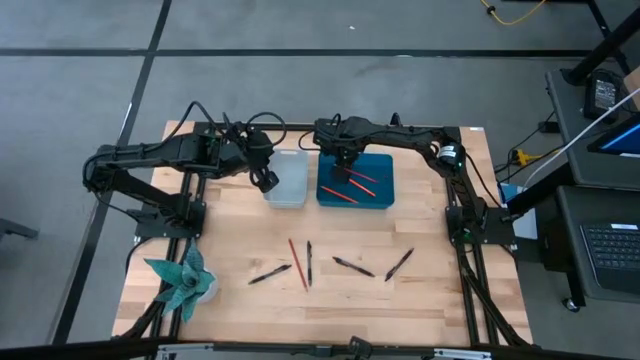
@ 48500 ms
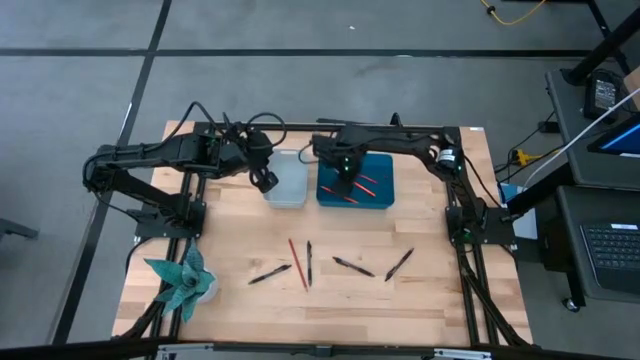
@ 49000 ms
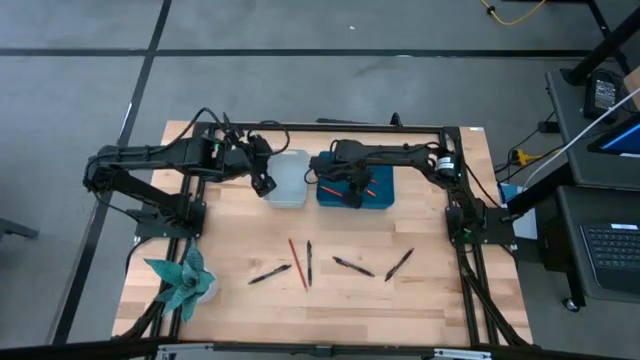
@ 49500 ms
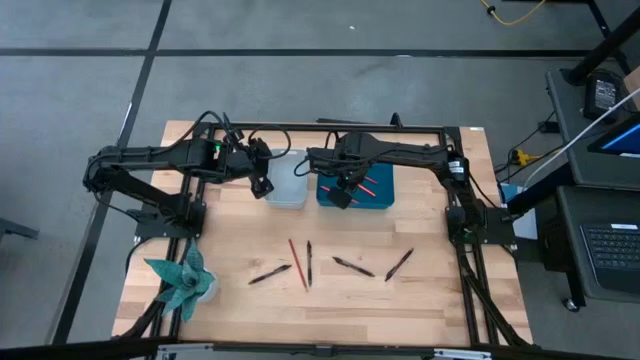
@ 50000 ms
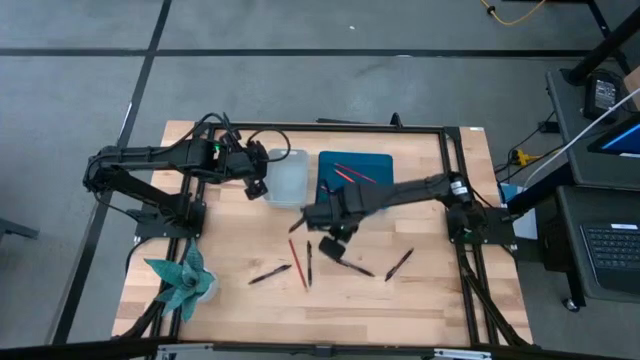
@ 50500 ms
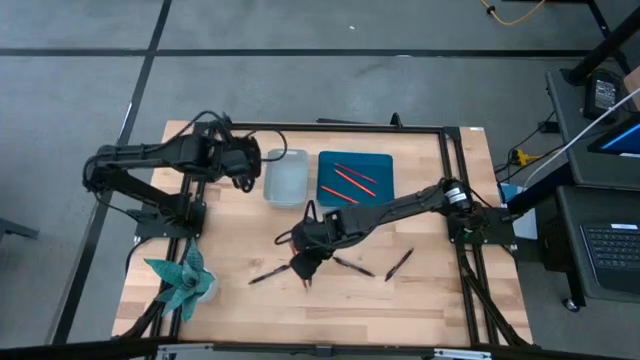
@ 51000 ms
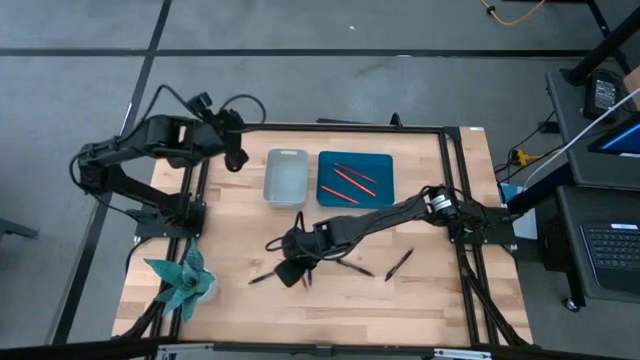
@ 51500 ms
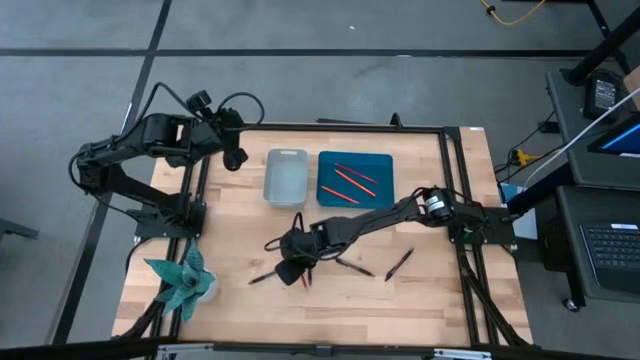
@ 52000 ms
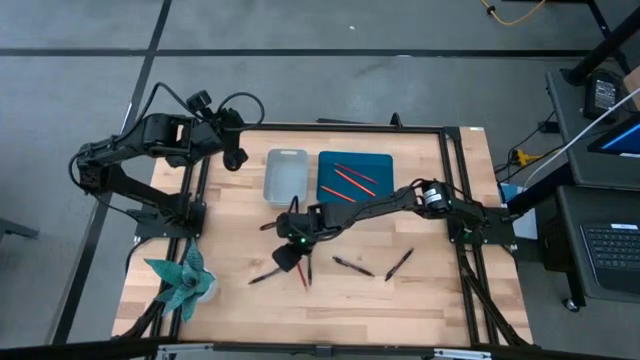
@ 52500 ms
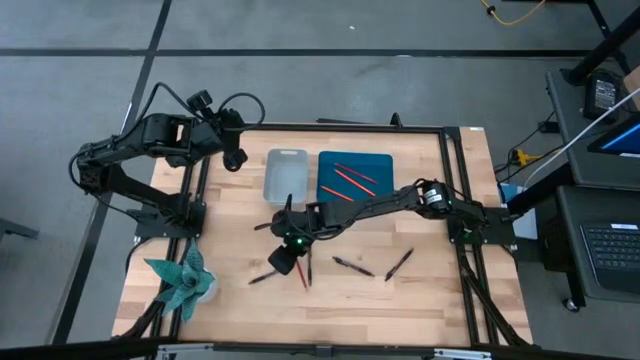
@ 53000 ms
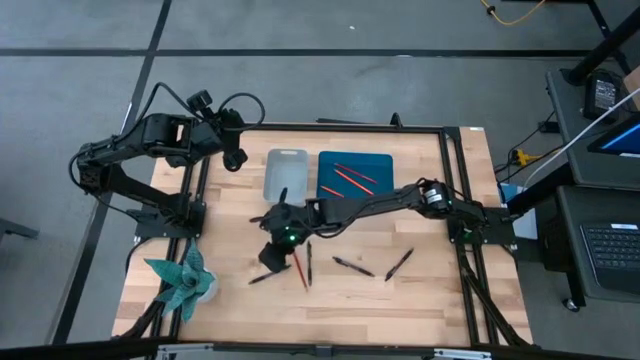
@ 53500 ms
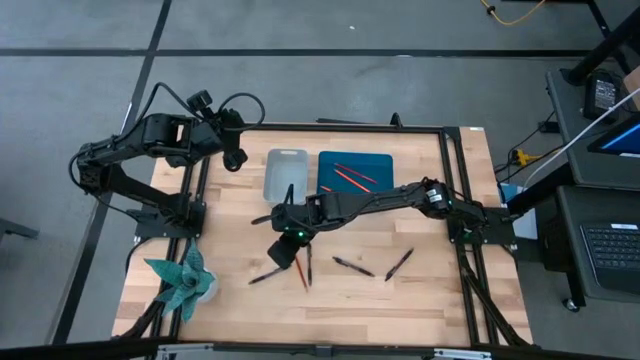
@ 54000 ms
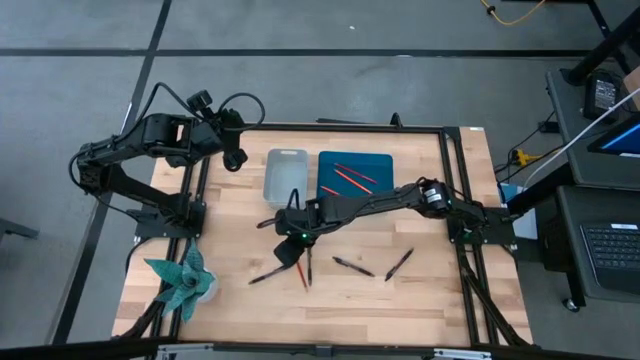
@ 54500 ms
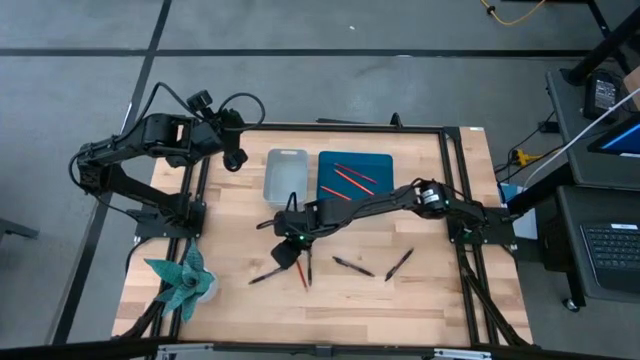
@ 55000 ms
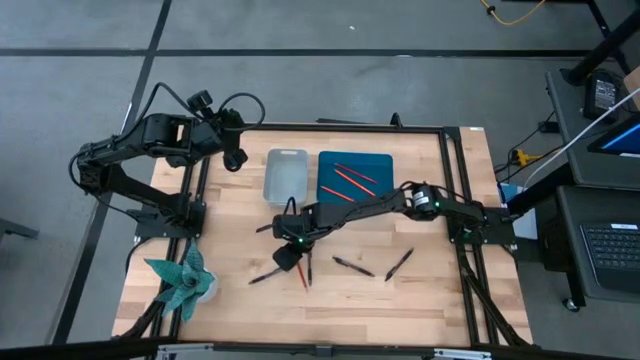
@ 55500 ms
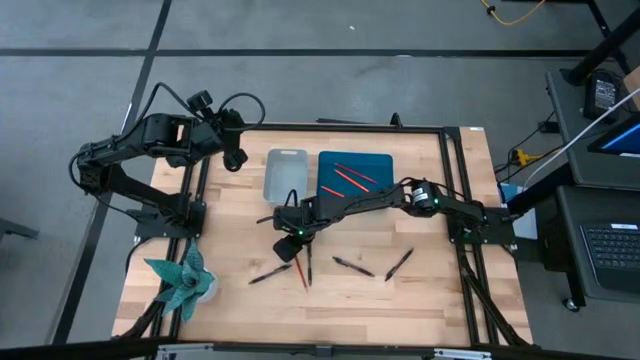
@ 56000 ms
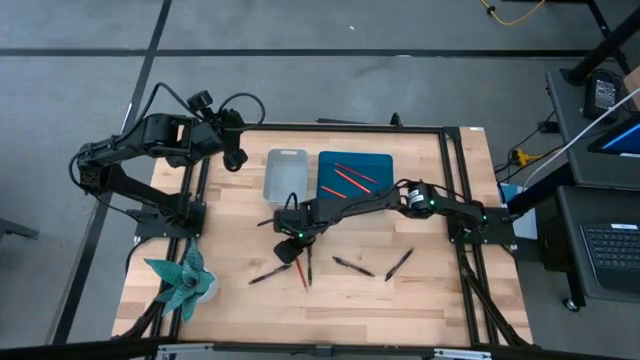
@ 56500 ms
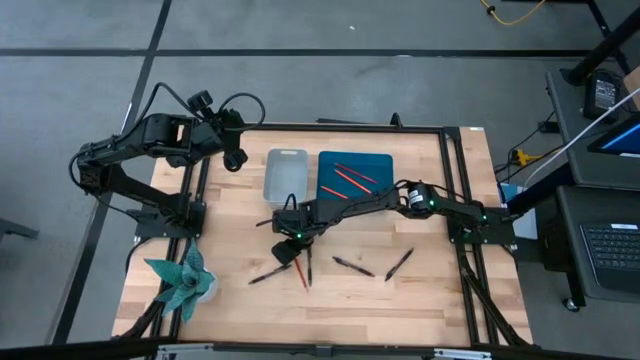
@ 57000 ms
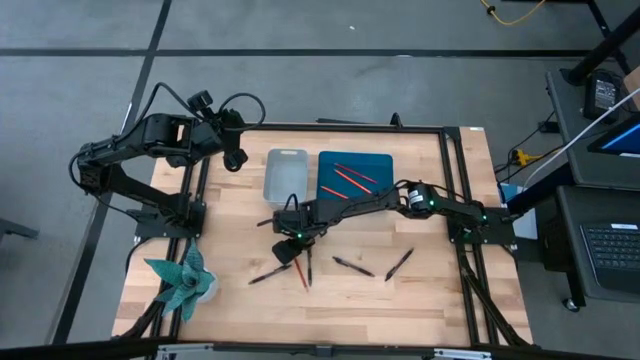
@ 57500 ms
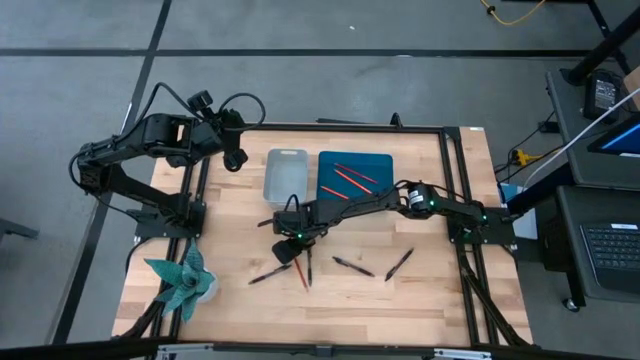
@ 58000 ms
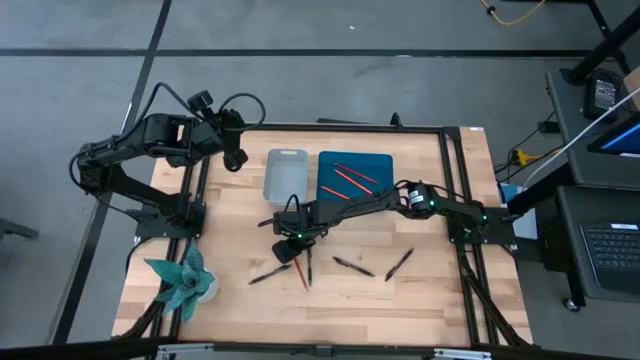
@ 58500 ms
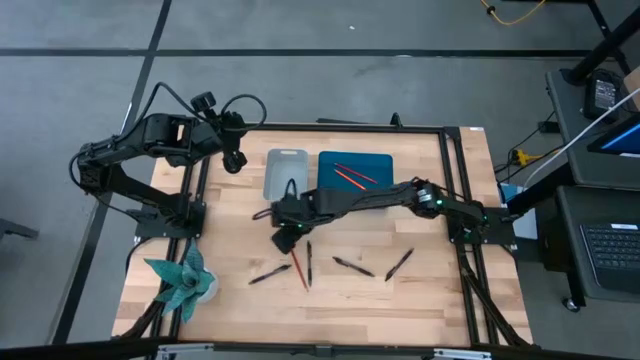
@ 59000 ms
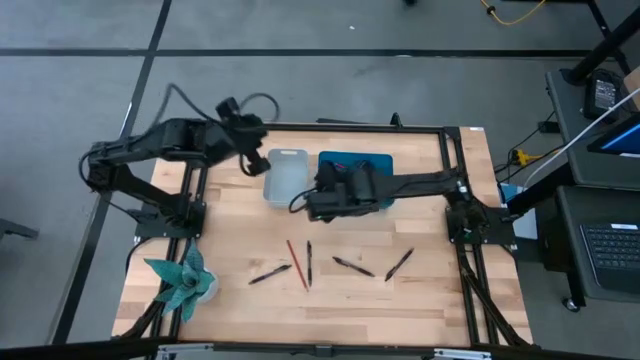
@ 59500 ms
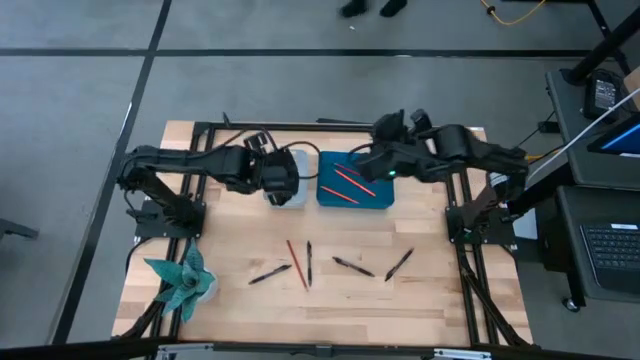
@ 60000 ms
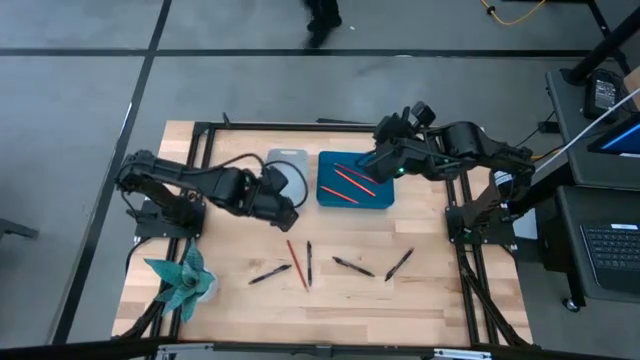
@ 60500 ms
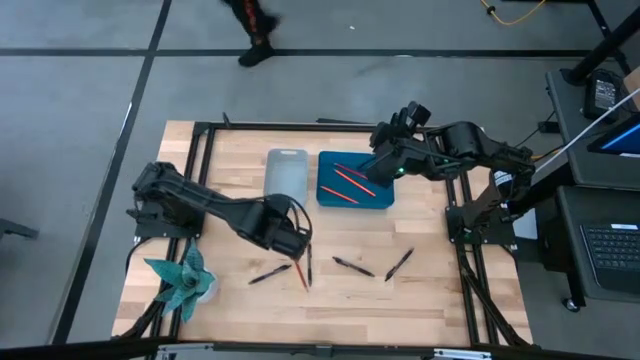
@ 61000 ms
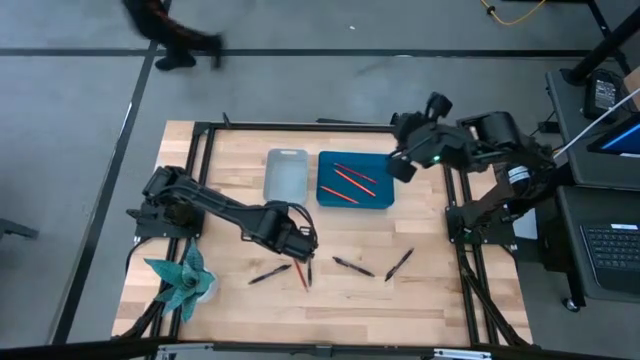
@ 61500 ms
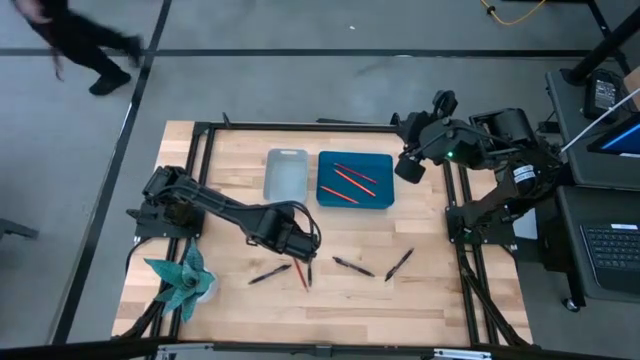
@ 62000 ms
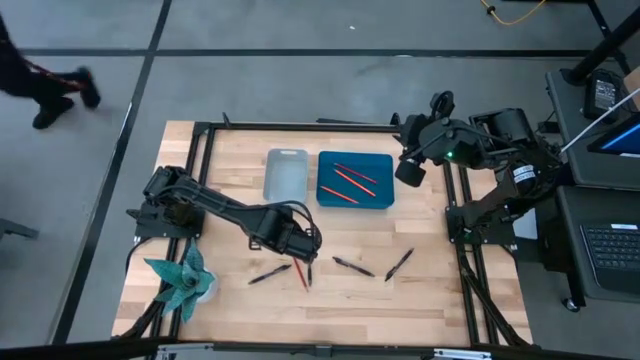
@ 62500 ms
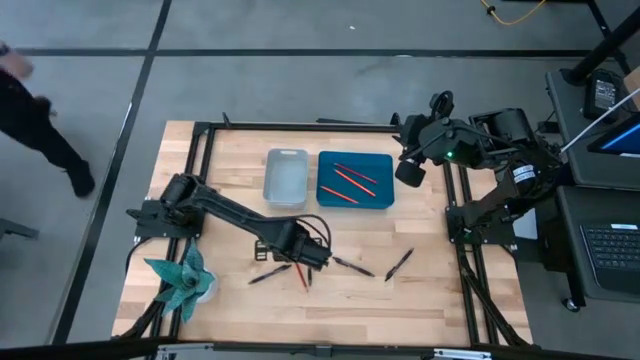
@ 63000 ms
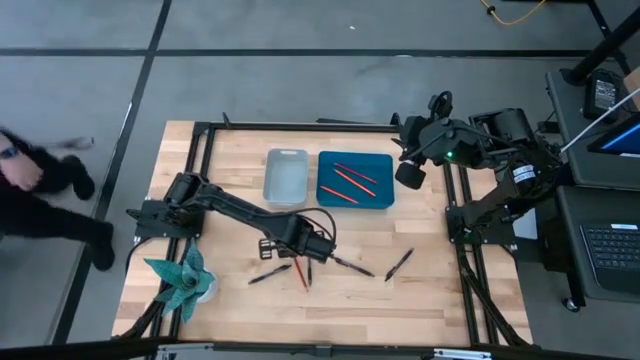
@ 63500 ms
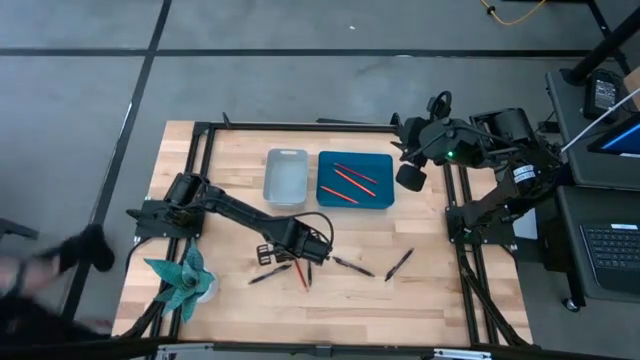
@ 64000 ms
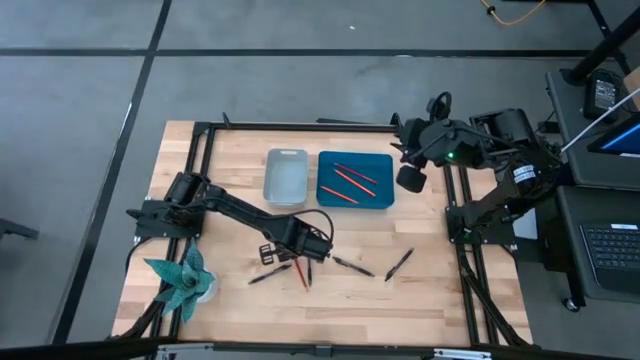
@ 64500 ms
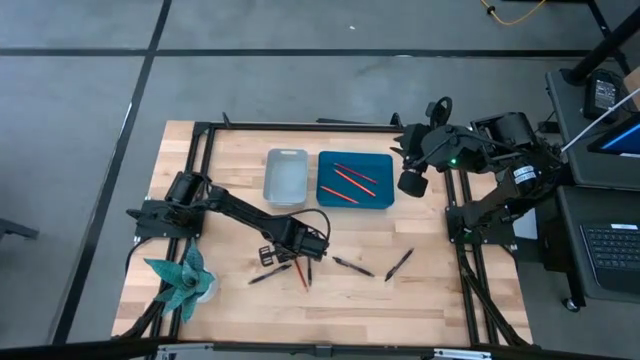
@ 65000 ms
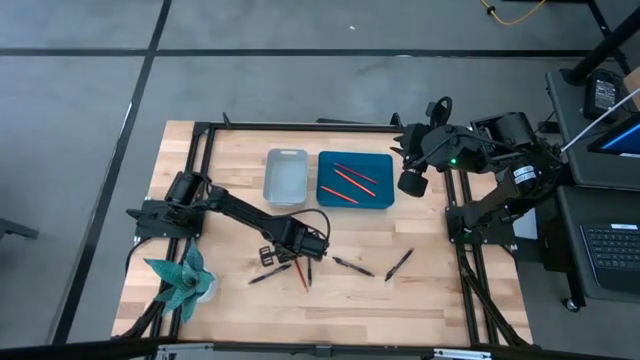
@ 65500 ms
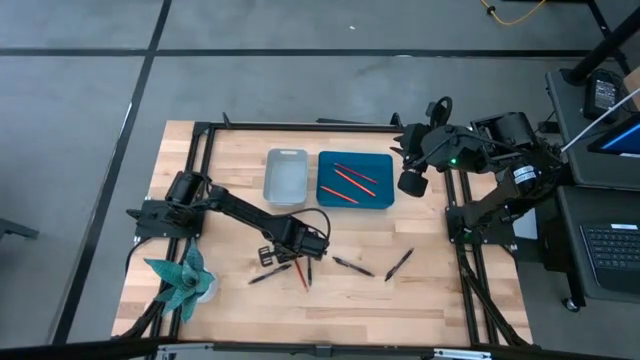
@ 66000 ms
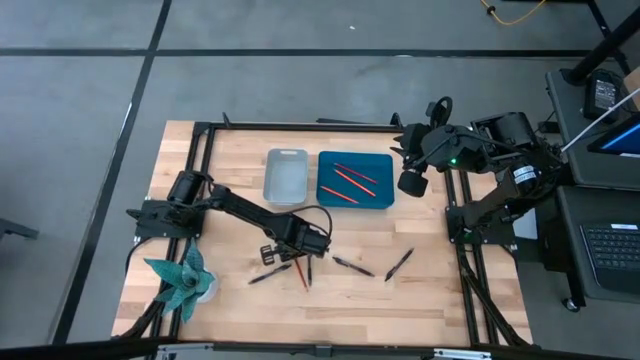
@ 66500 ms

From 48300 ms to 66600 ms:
Task: Sort pens & pencils
Put the red pencil into the blue bin

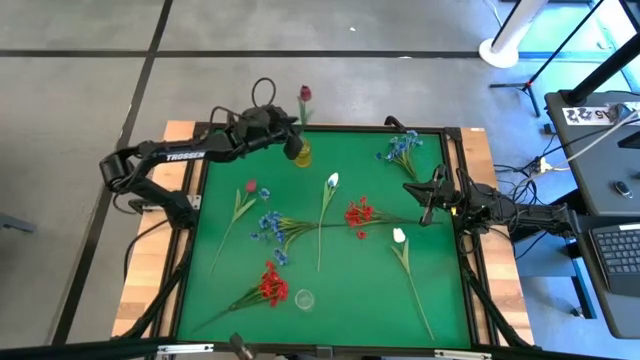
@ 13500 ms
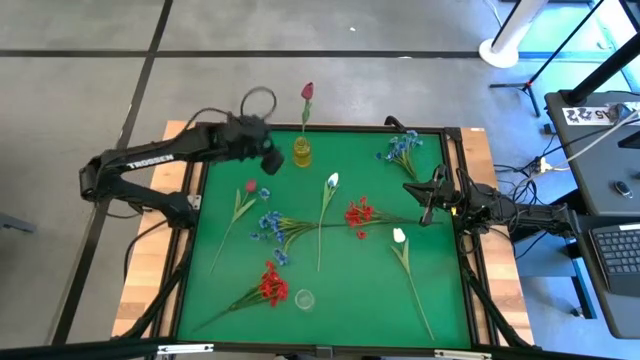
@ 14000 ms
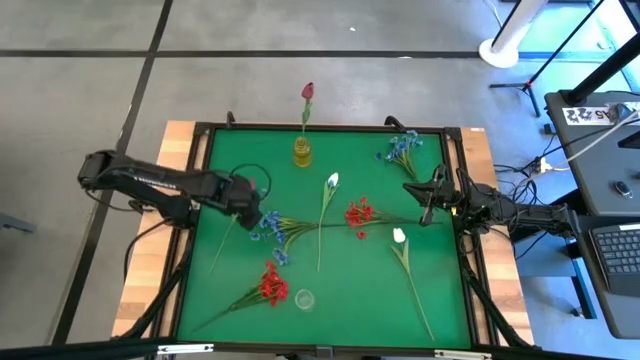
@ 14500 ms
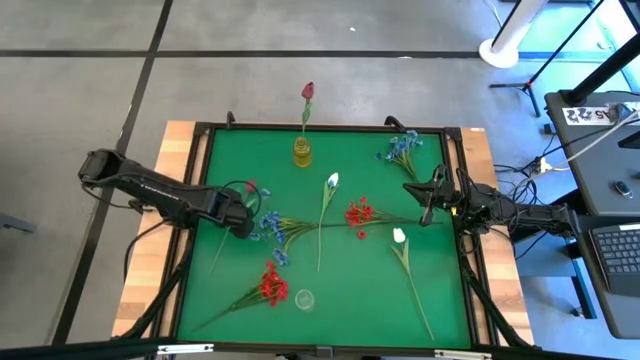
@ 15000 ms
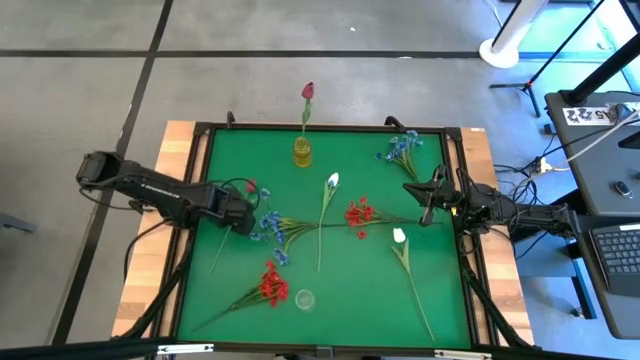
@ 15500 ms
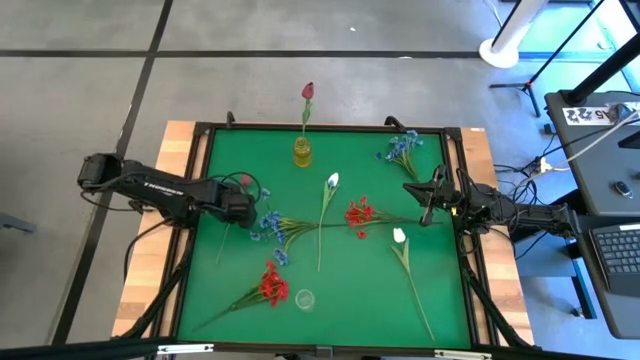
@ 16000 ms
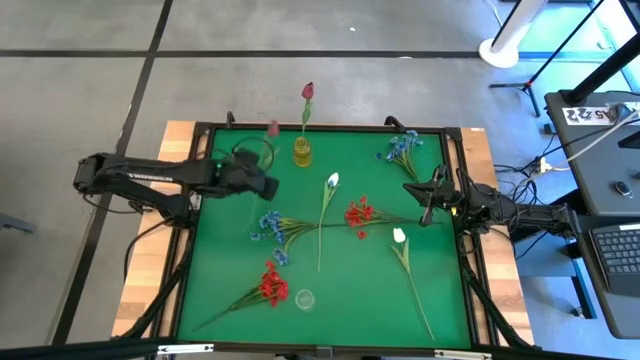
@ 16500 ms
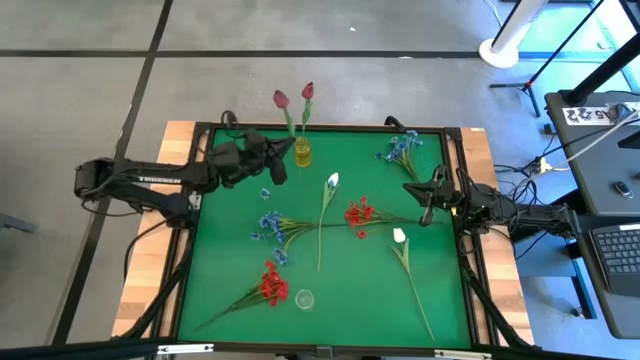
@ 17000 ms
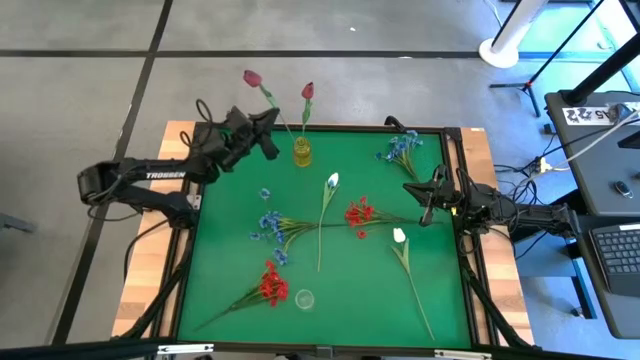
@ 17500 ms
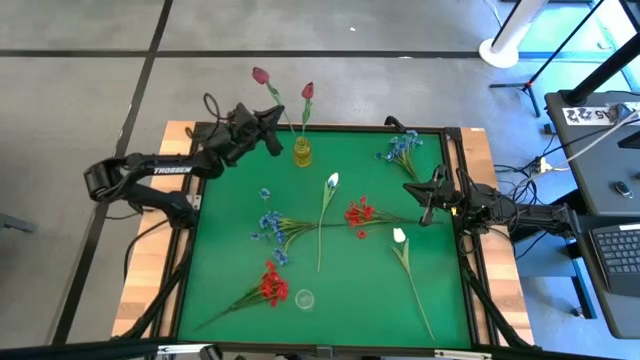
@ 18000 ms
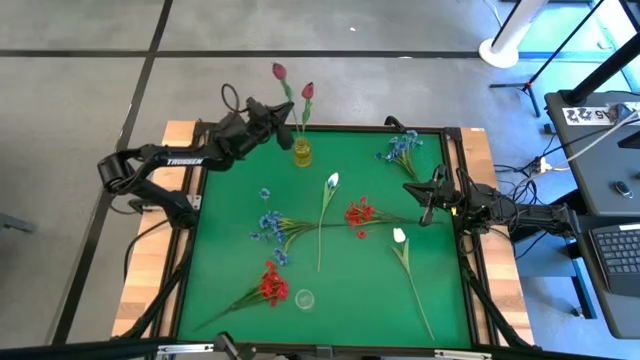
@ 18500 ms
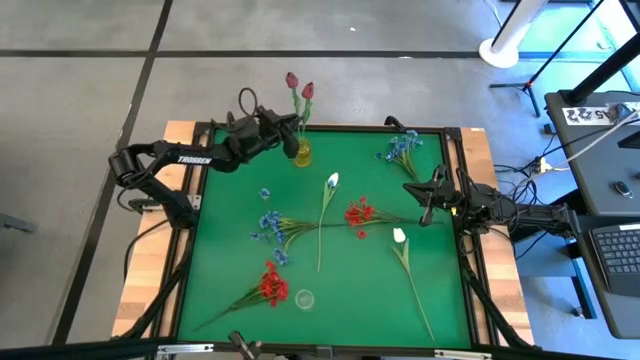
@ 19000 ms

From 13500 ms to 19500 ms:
Task: Sort flowers into vase by color
Put the red tulip into the yellow vase
